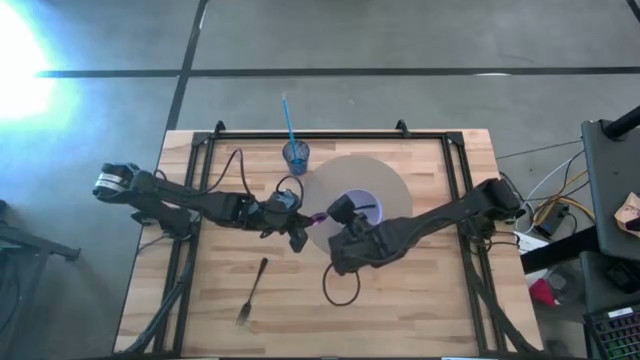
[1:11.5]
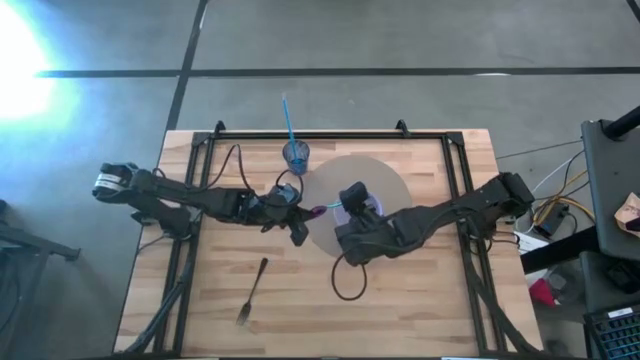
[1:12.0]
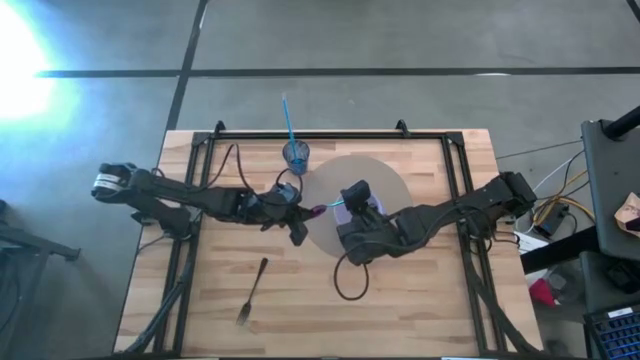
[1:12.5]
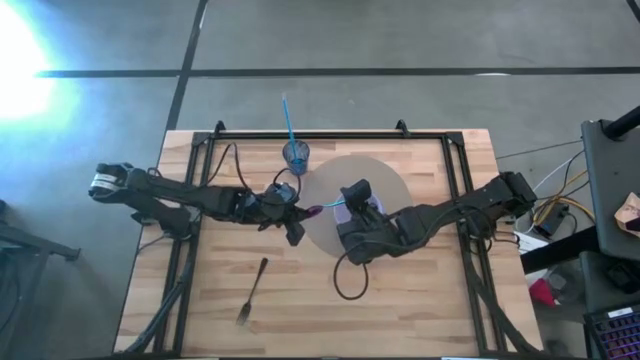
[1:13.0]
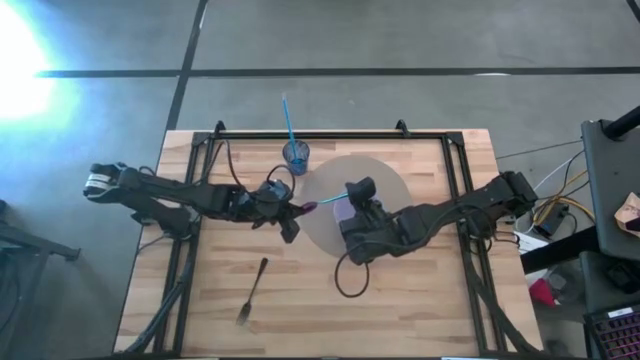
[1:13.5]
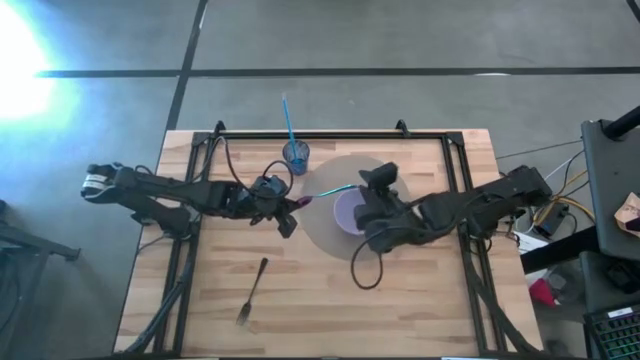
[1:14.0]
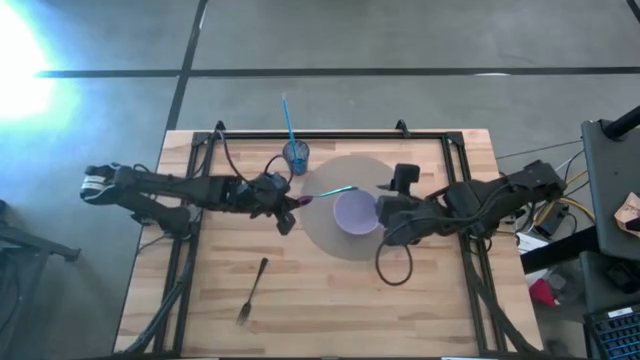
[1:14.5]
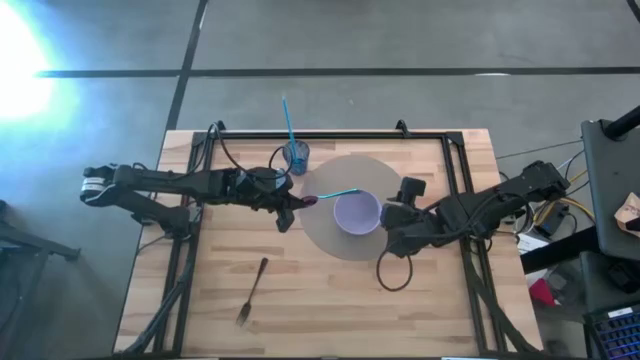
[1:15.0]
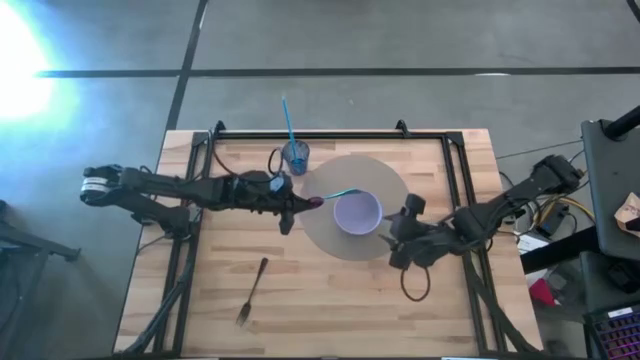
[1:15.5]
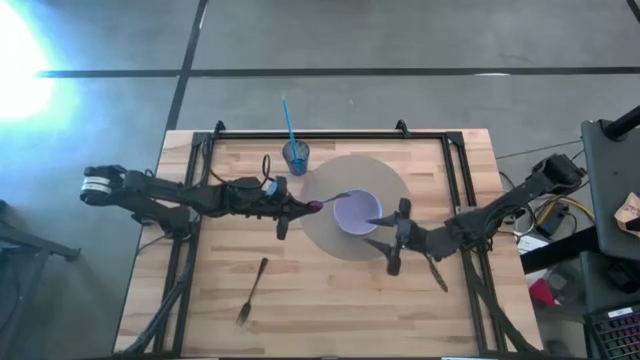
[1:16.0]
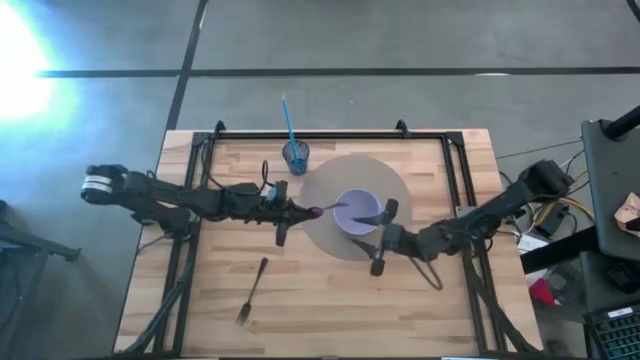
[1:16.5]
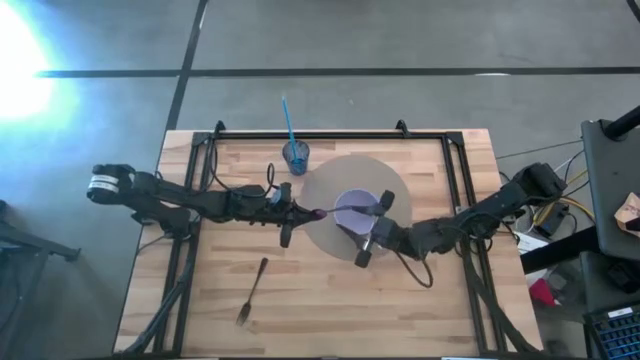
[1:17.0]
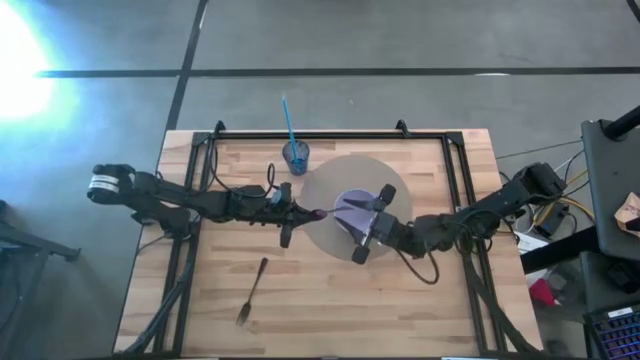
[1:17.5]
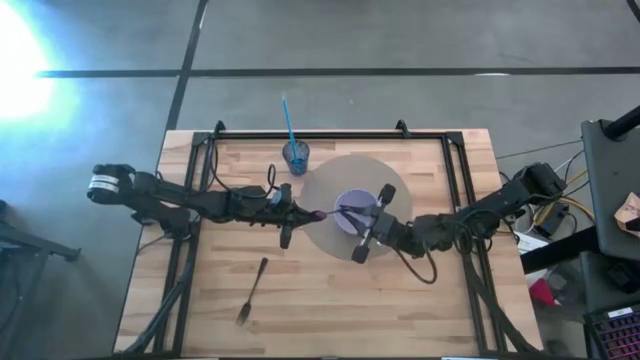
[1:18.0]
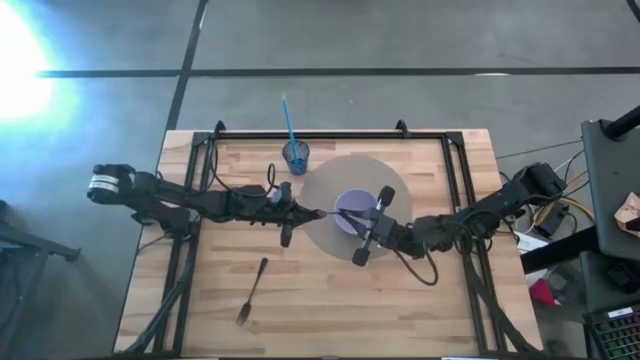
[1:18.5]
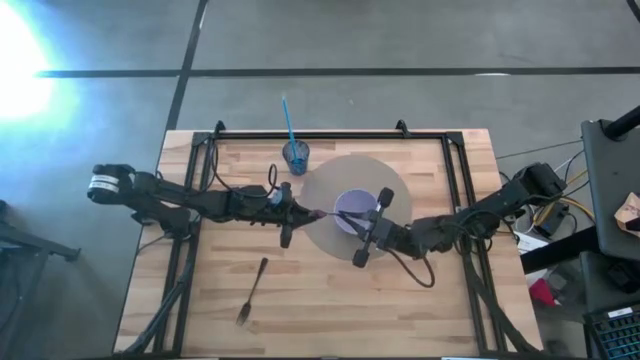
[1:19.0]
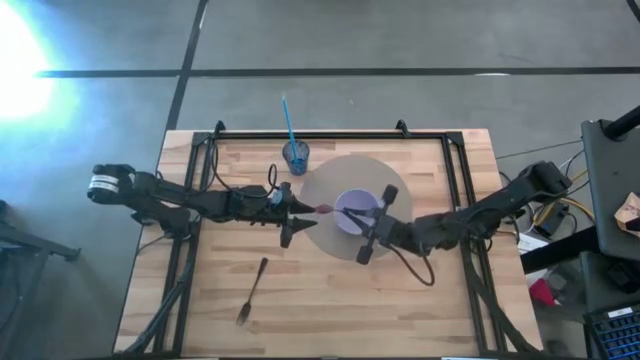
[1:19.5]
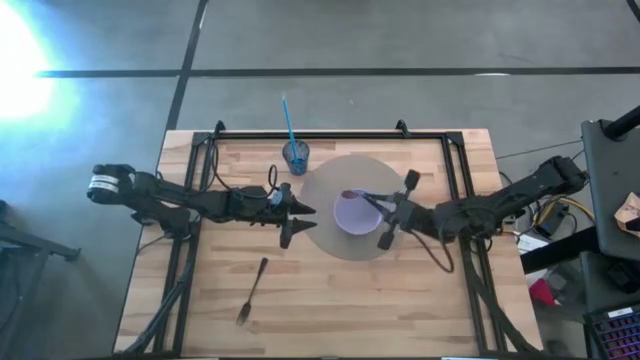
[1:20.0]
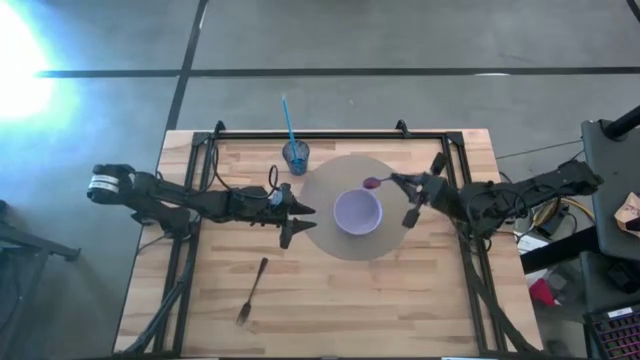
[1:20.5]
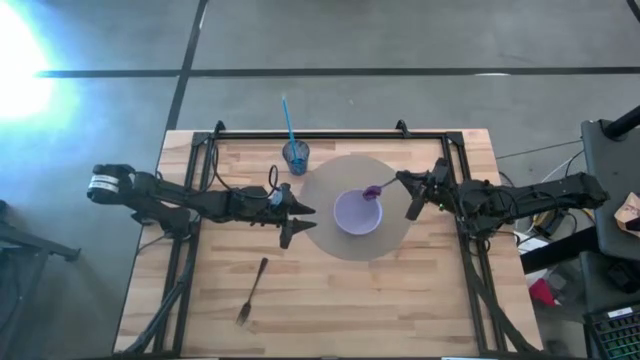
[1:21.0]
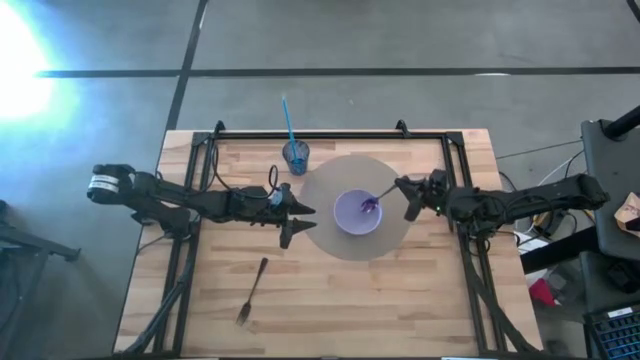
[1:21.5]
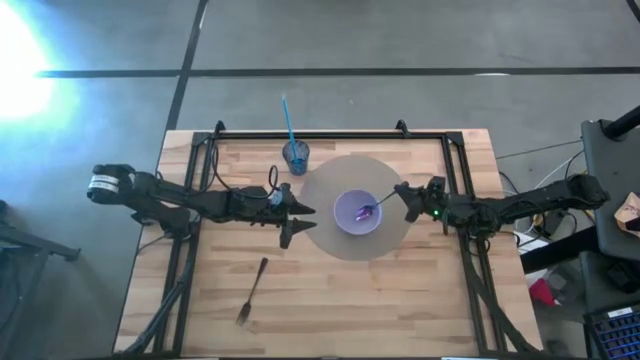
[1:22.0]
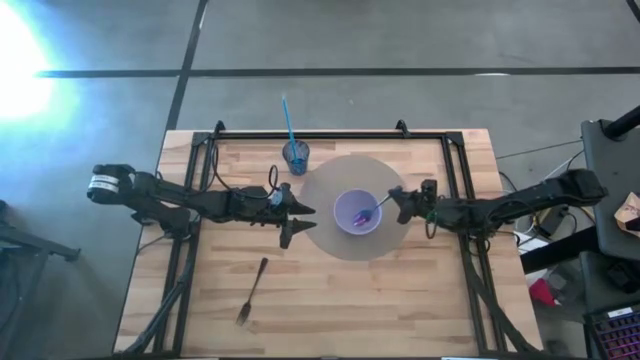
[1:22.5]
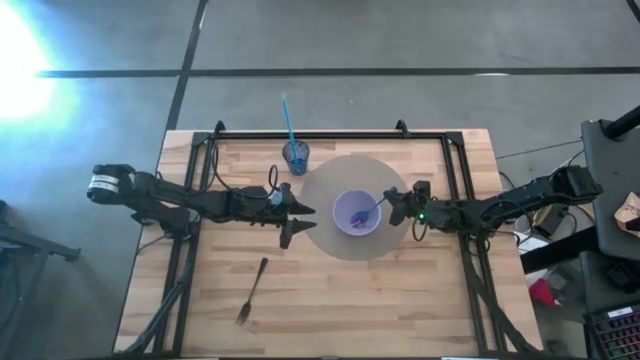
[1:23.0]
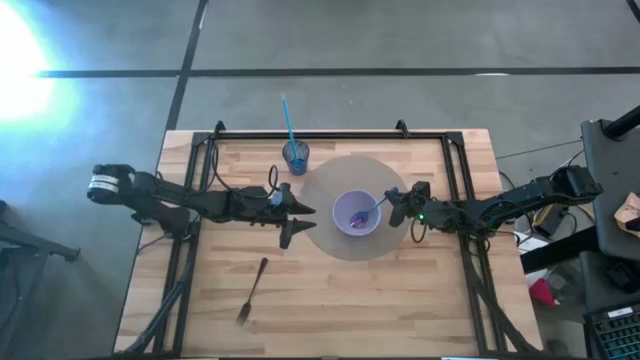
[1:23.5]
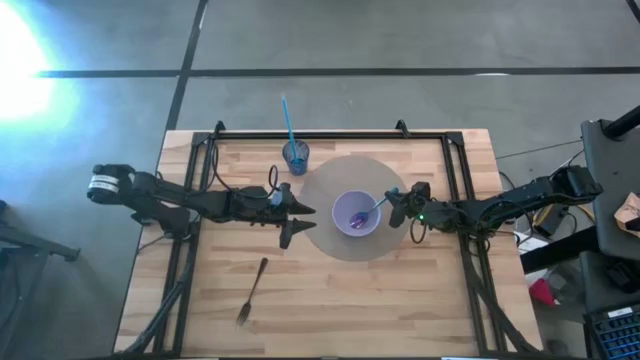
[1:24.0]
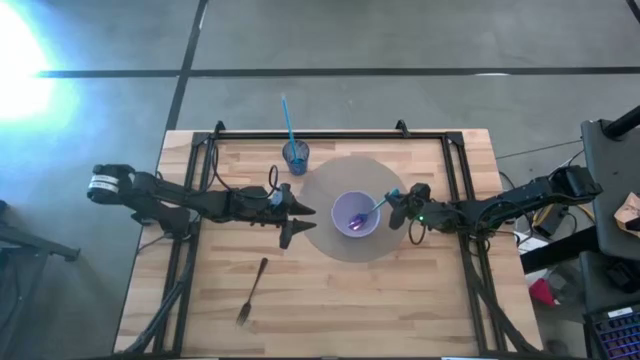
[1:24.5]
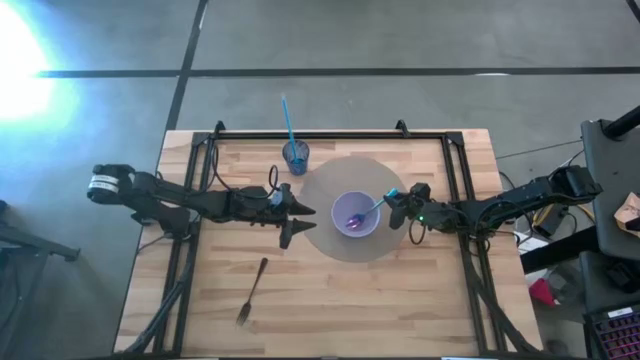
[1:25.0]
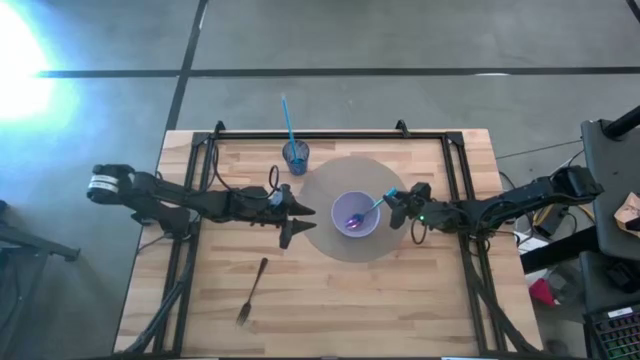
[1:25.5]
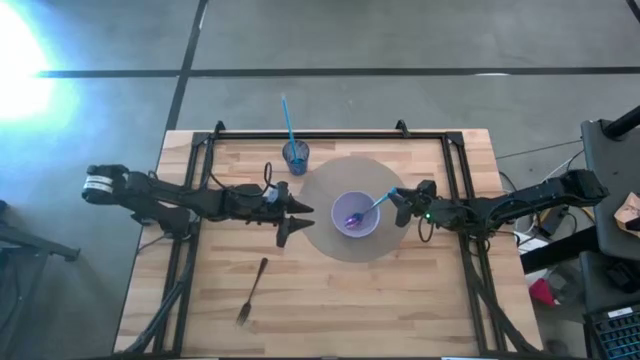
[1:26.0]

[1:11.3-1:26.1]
Task: Pick & Place Utensil
Put the blue spoon into the purple bowl

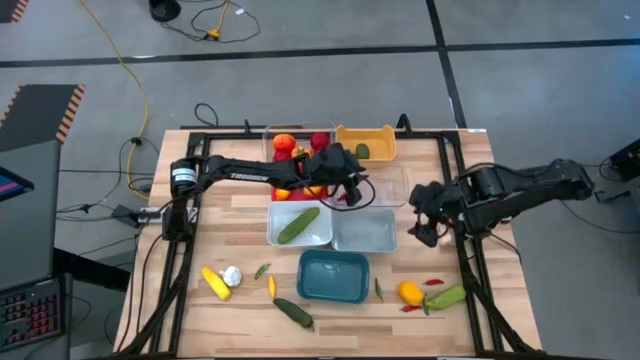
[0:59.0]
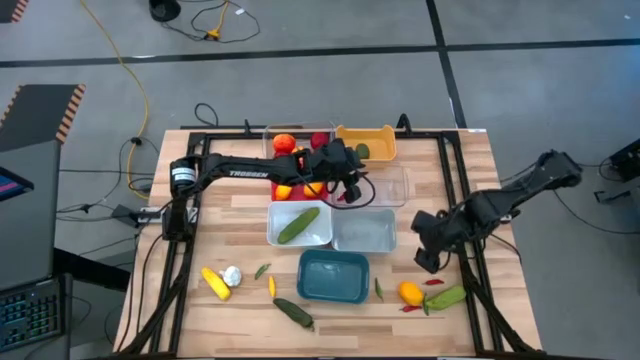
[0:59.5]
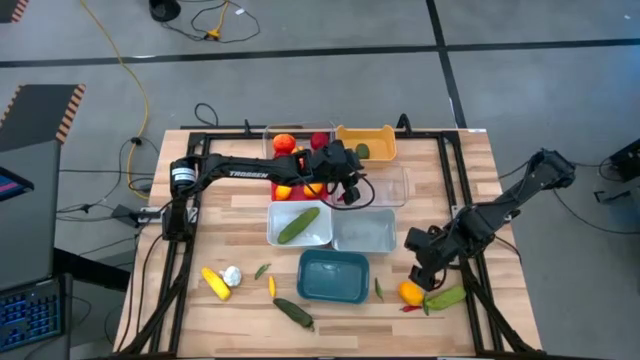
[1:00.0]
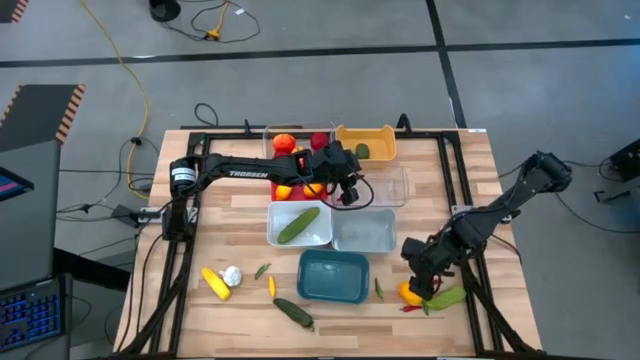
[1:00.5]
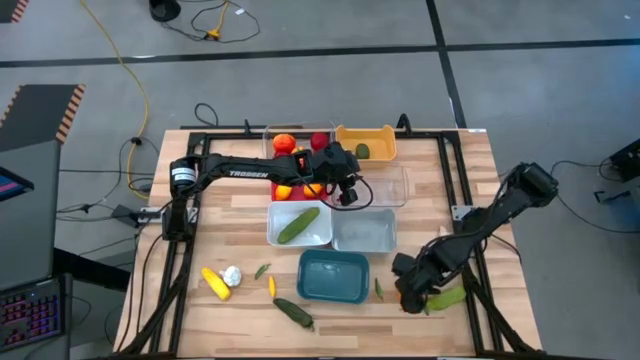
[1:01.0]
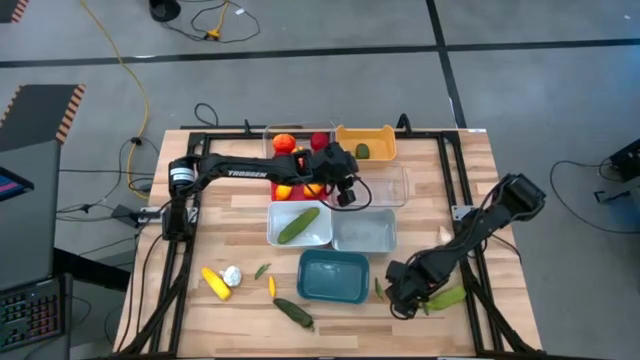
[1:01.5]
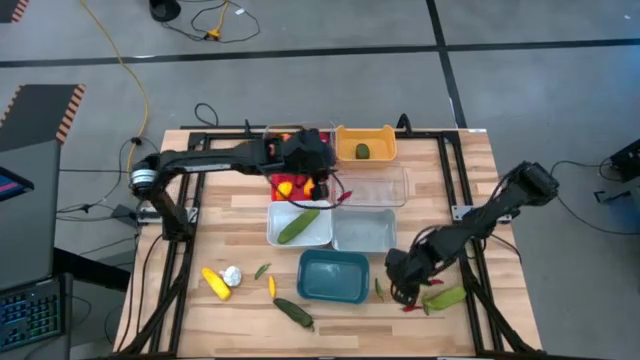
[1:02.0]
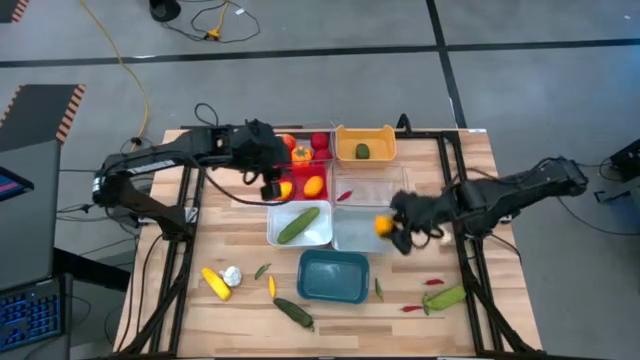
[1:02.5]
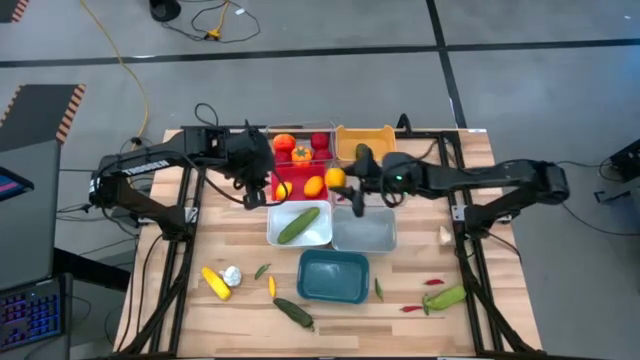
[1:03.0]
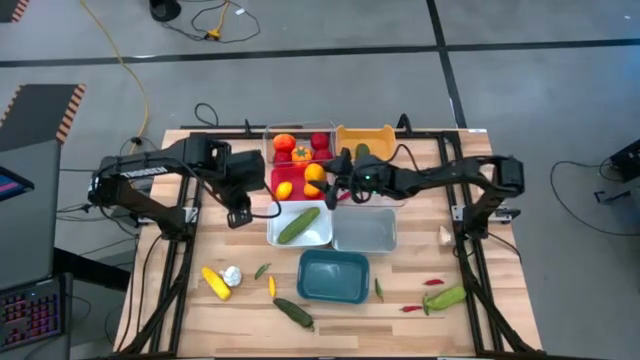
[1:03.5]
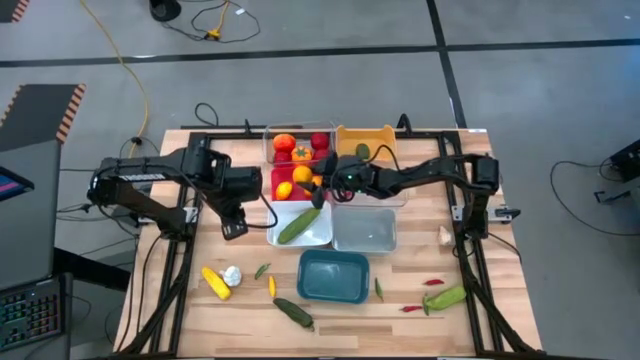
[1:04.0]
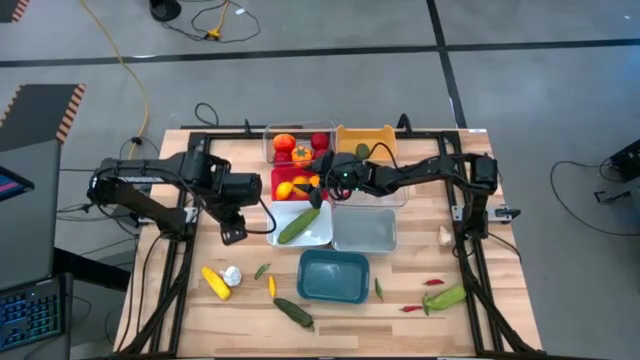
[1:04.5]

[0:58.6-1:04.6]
Task: Sort produce into baskets
Put the yellow lemon into the red bin

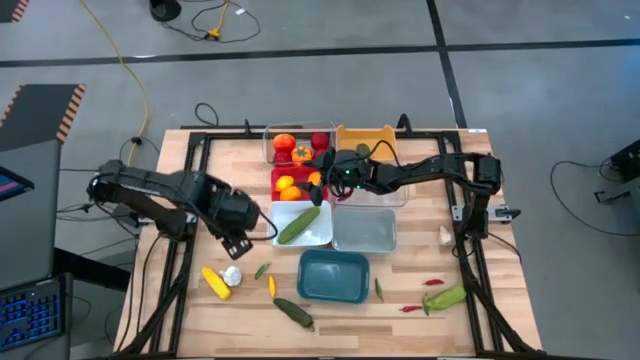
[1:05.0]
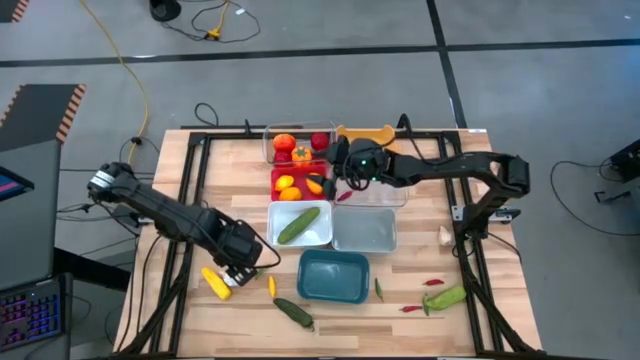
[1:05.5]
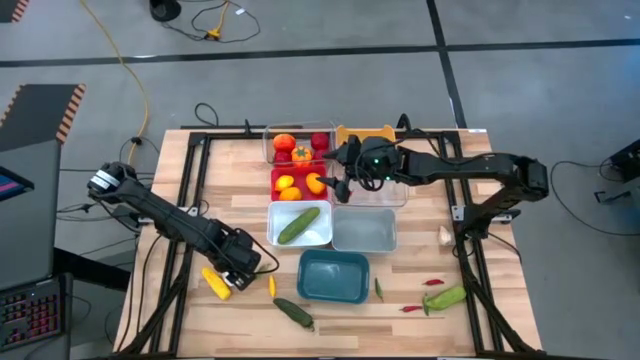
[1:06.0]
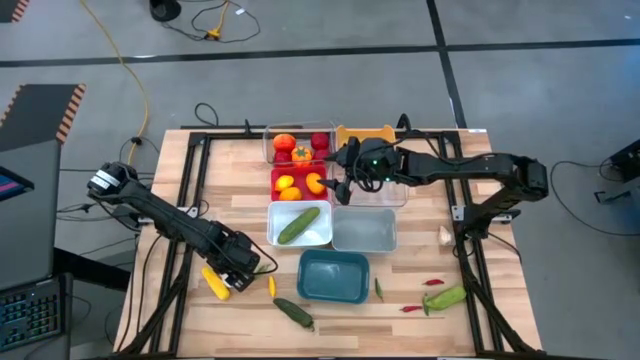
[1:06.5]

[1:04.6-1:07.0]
Put the left white garlic into the gray bin
